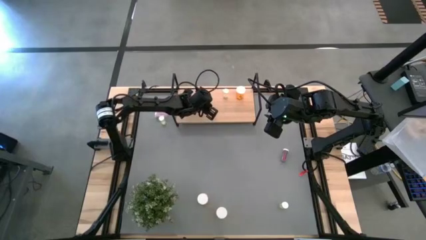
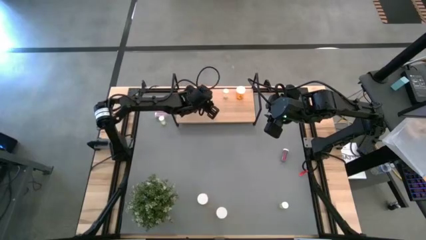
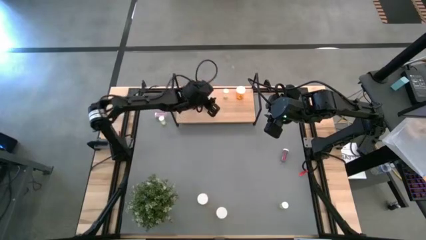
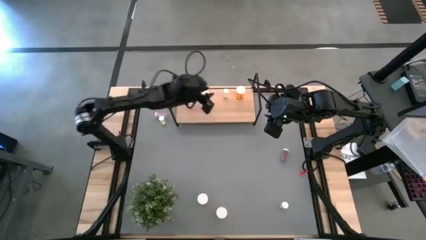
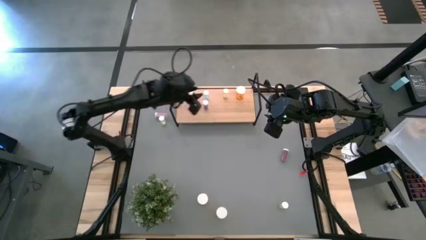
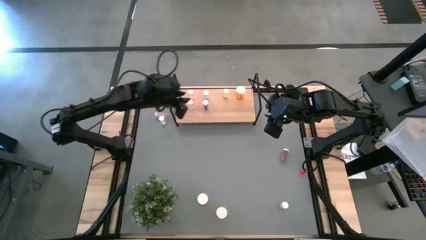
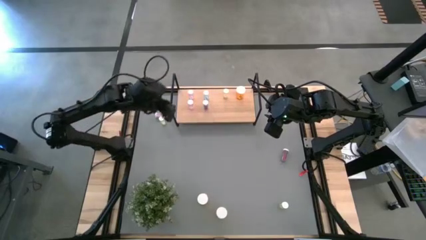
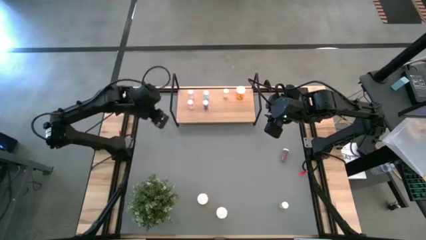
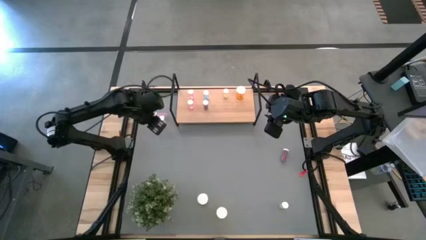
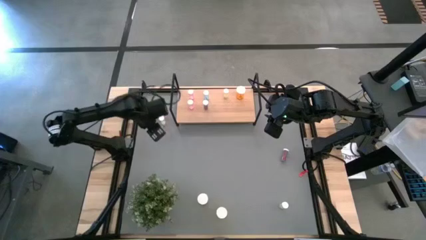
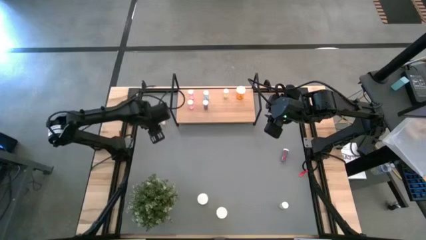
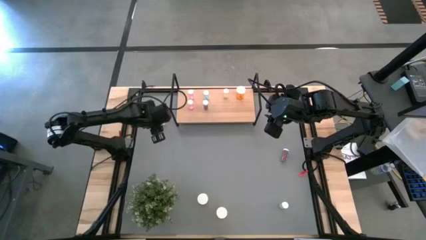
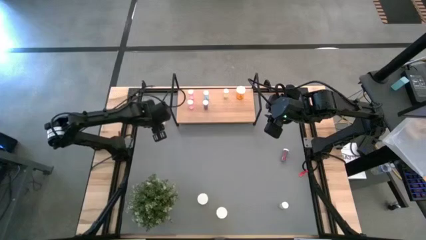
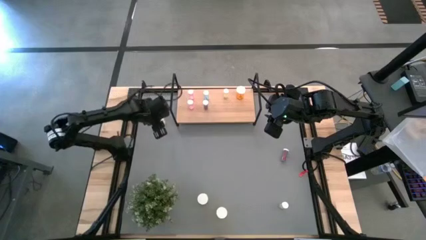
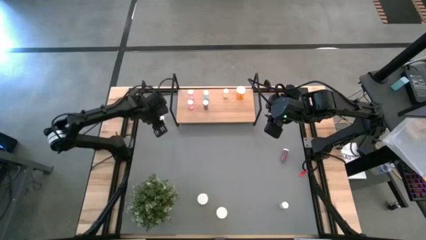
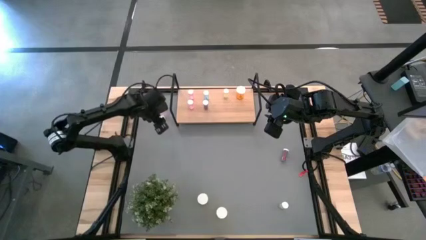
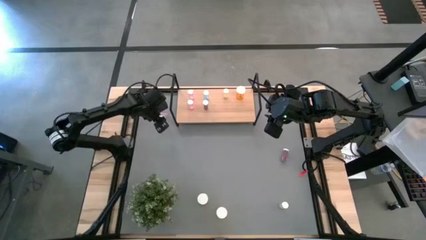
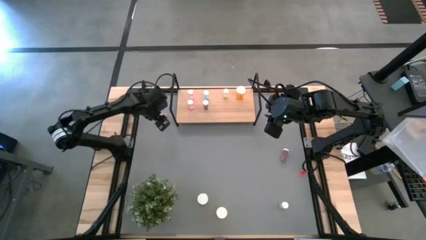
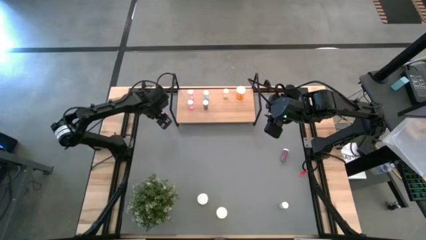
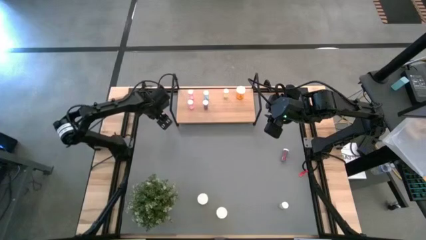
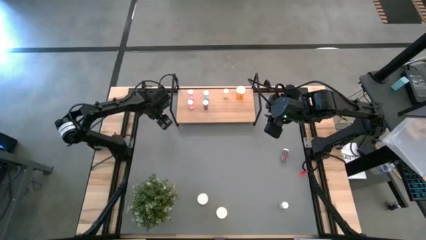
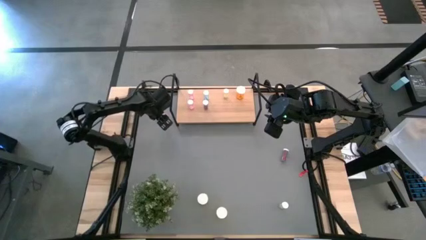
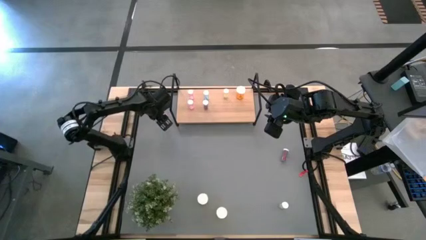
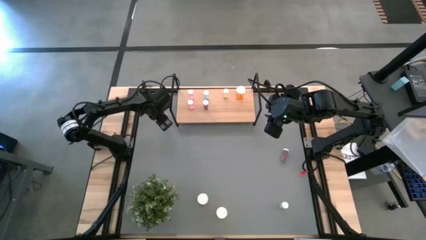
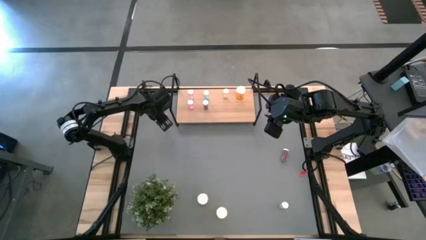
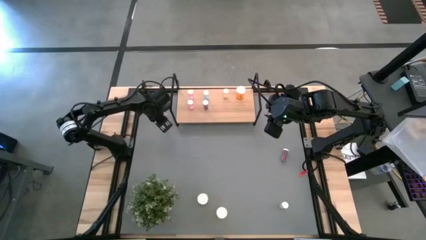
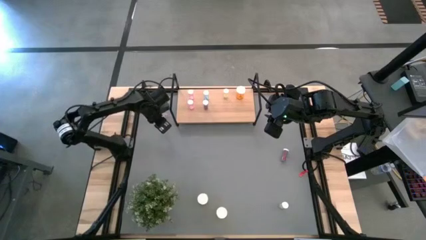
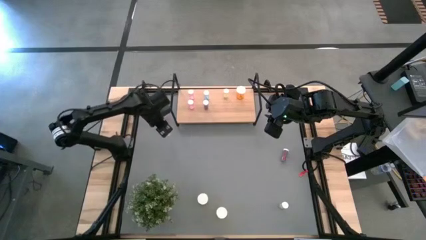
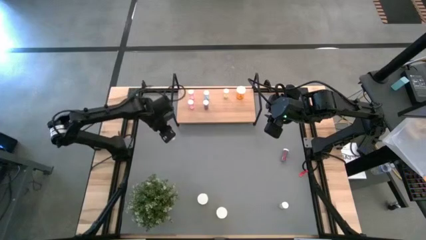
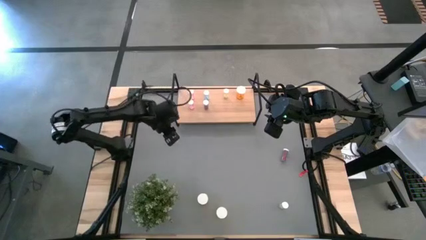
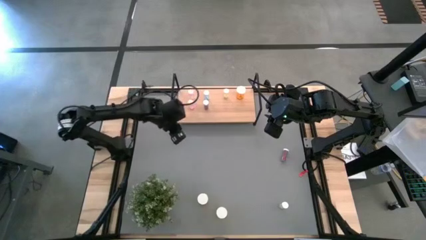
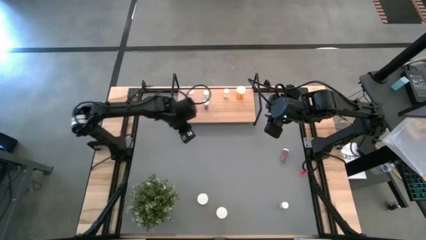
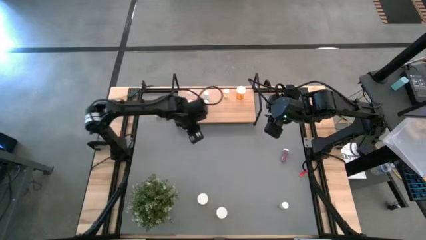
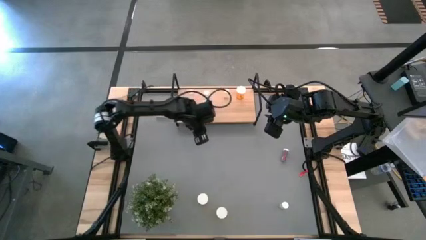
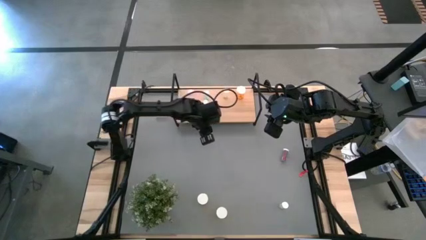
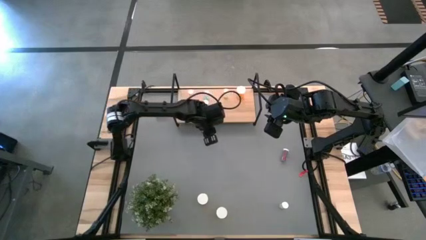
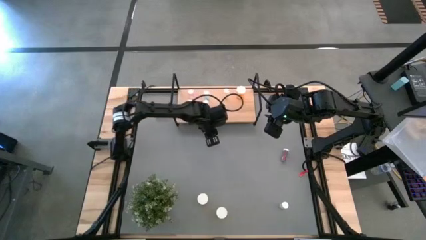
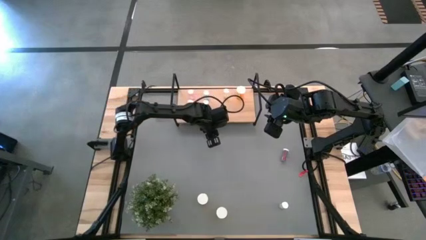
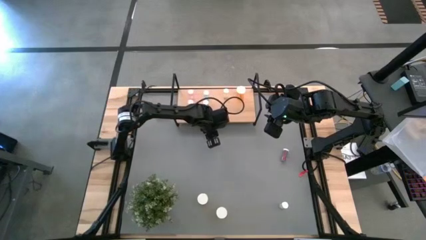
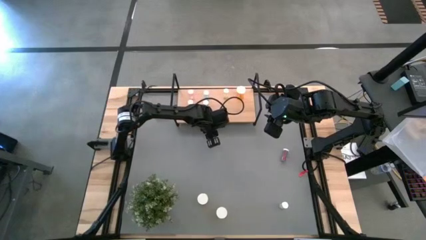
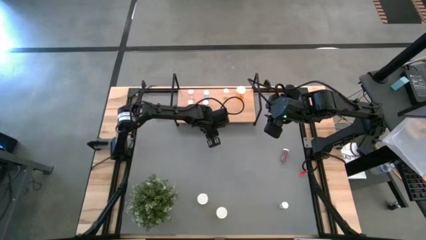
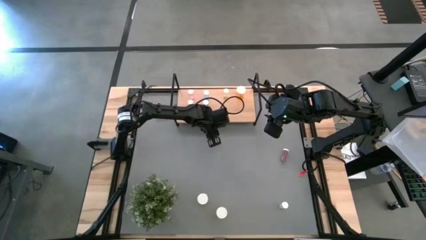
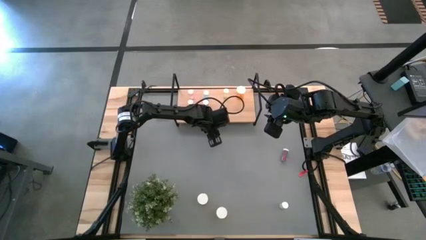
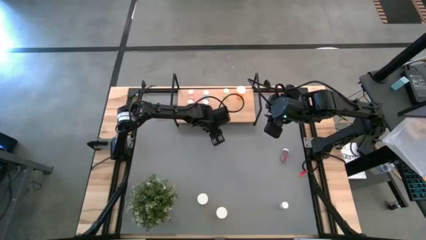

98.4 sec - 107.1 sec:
Task: Pick and place medicine bottles onto shelf by color
Move the left yellow pill bottle to the center

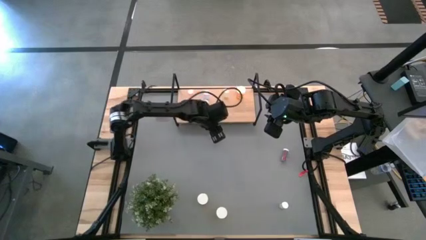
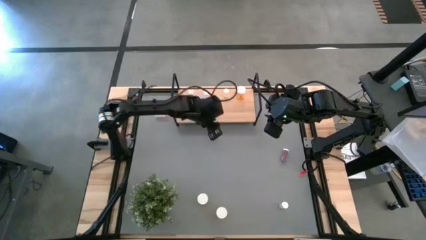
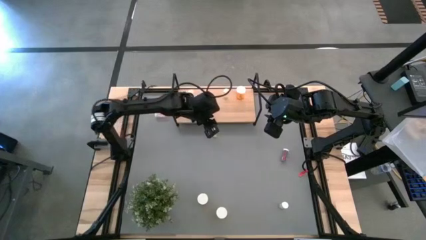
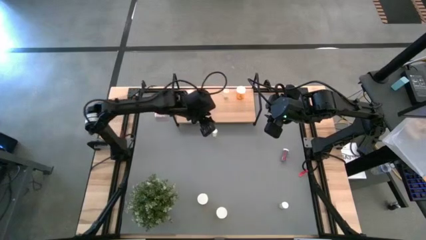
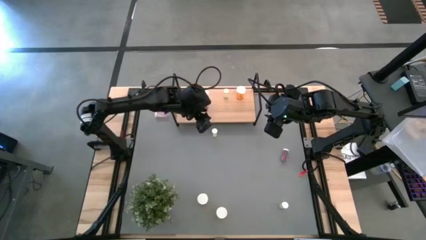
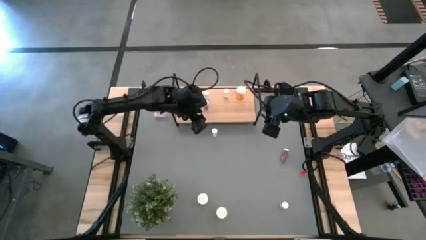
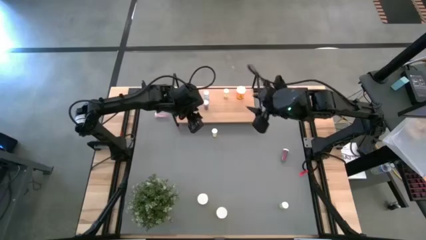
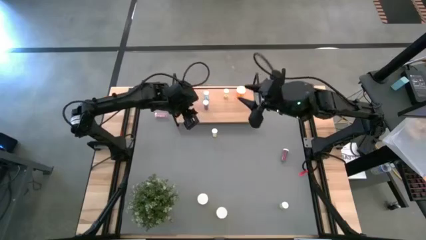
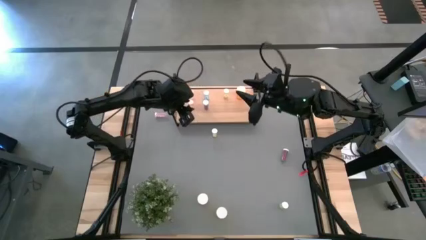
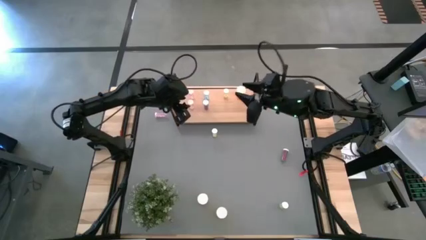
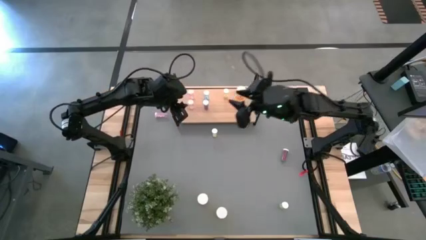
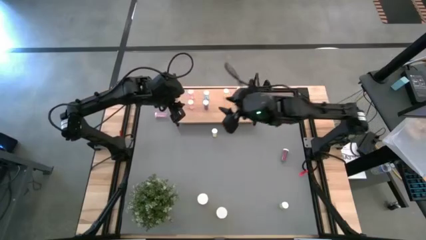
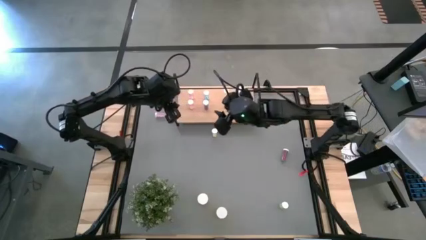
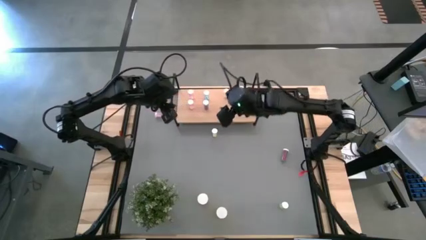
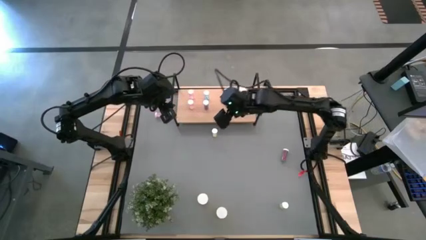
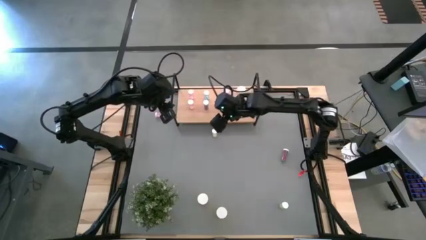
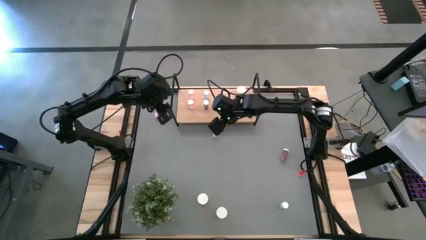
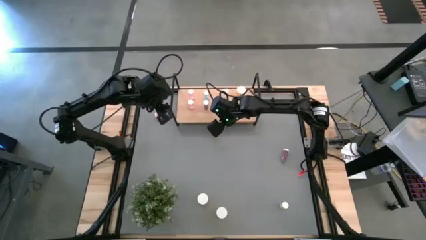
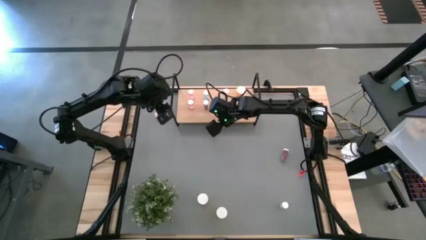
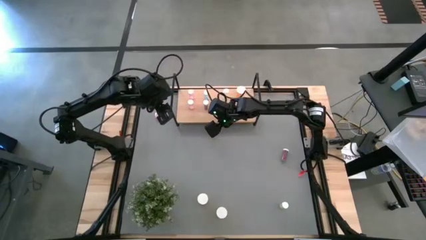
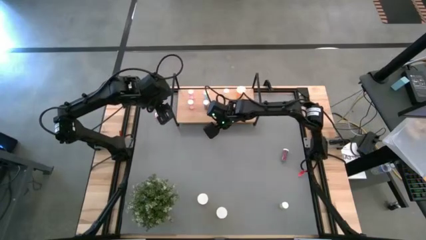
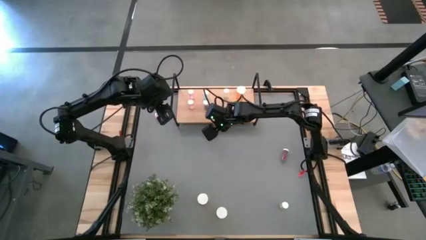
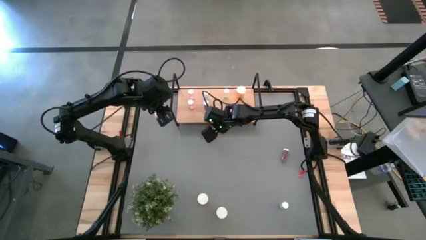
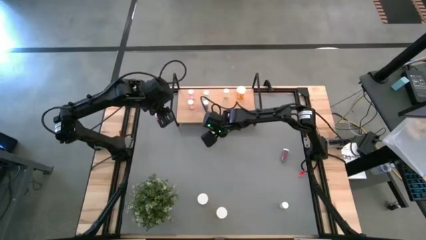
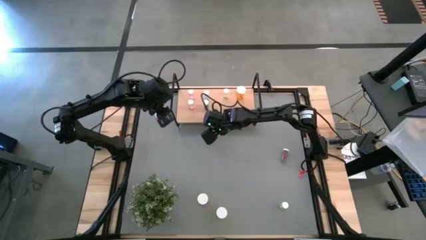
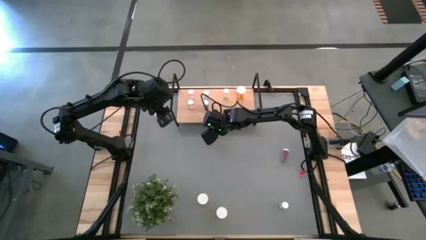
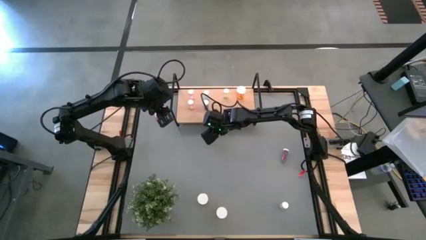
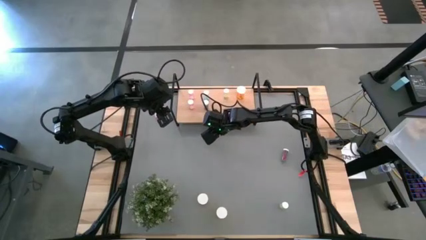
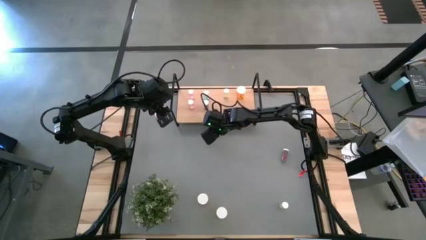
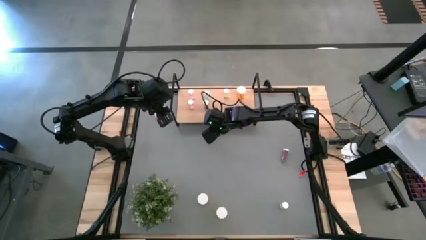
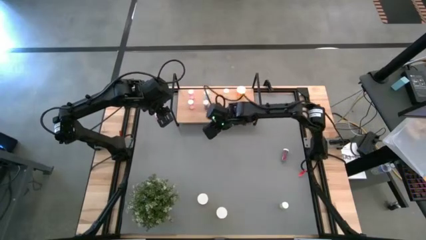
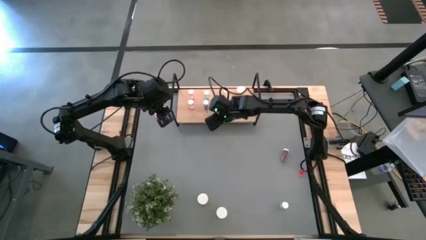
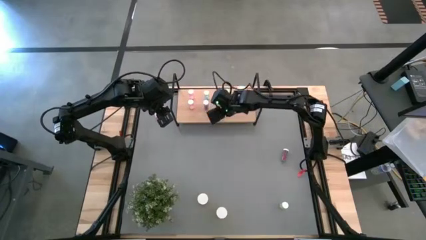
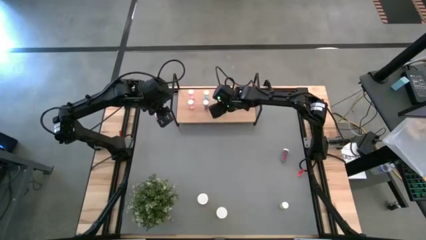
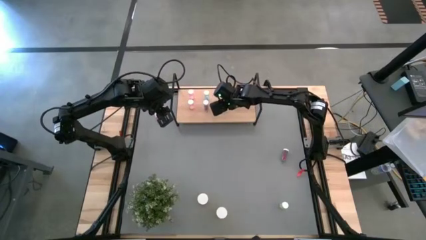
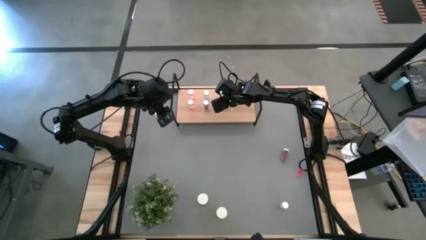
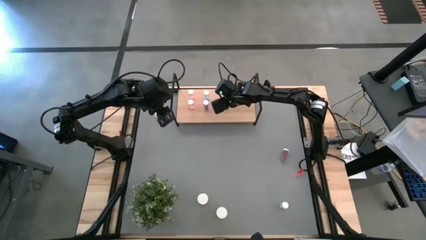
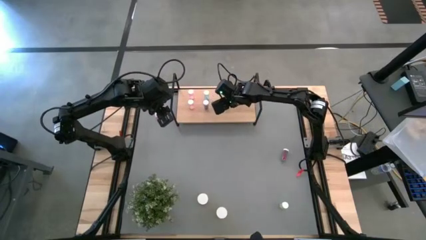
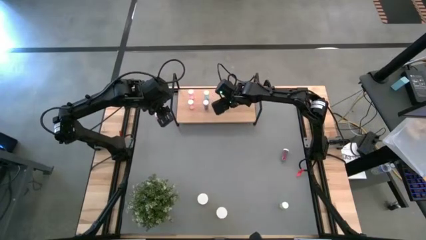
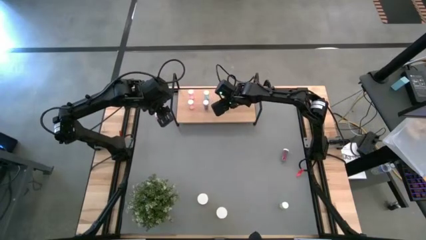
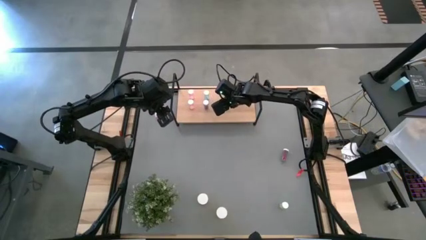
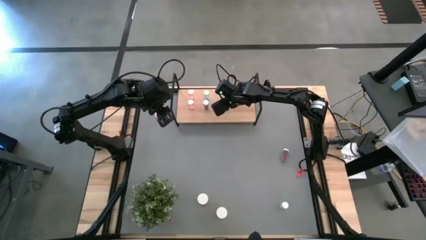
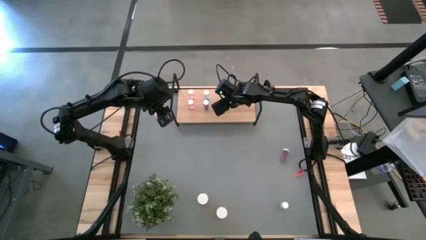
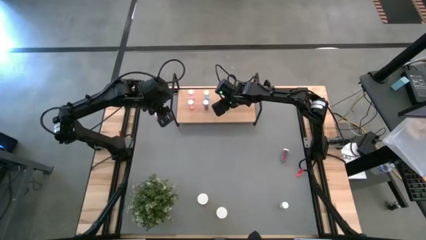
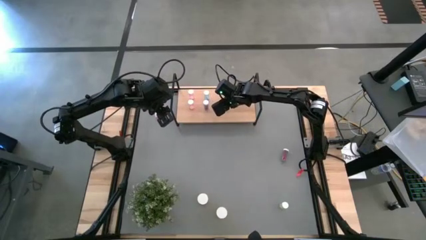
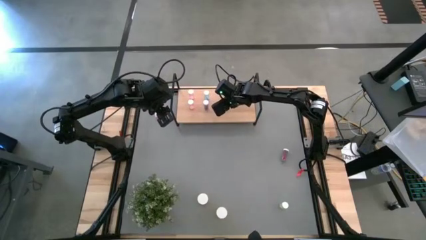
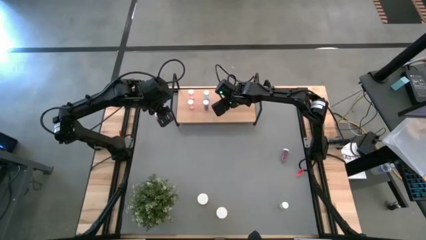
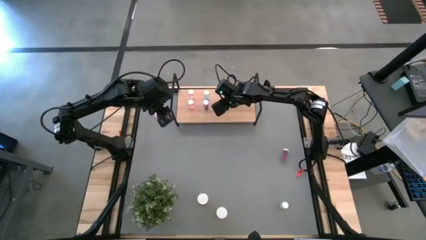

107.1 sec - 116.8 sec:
Put the left yellow pill bottle on the shelf aligned with the other yellow pill bottle
